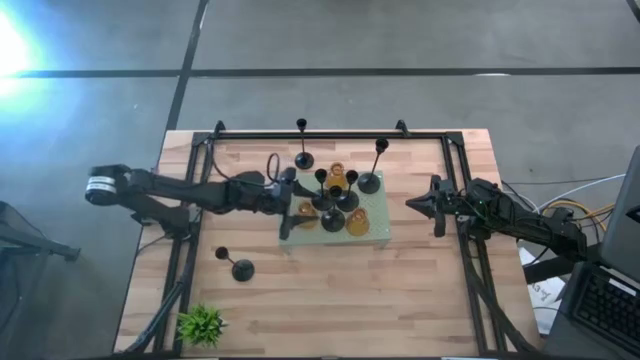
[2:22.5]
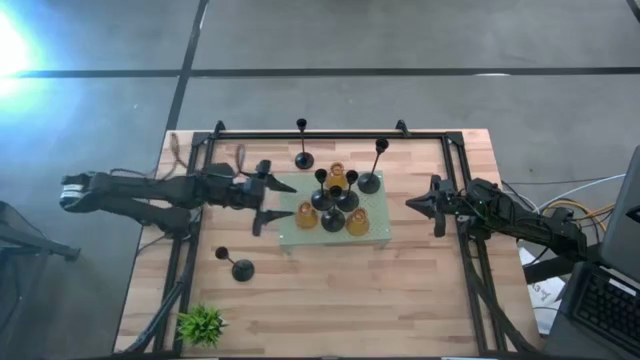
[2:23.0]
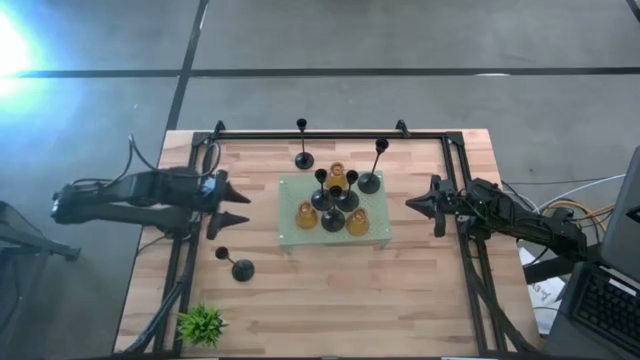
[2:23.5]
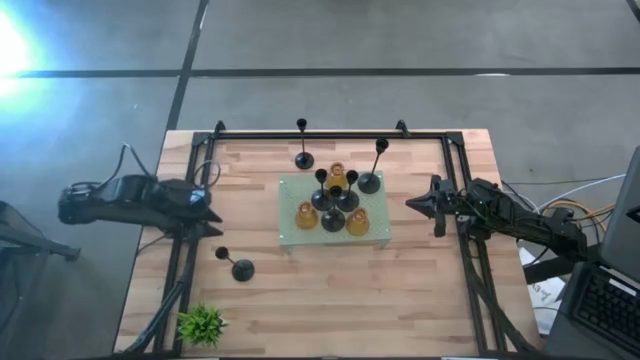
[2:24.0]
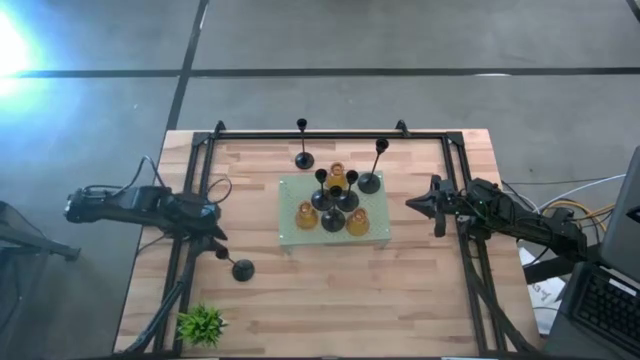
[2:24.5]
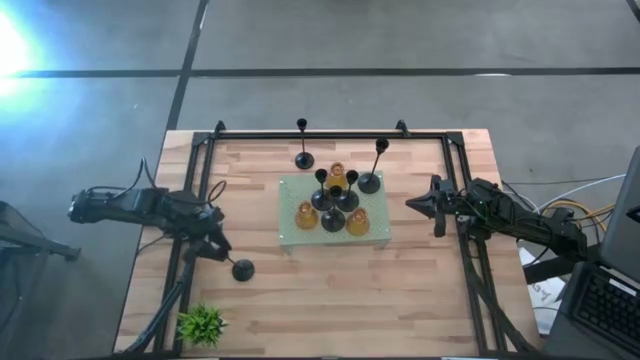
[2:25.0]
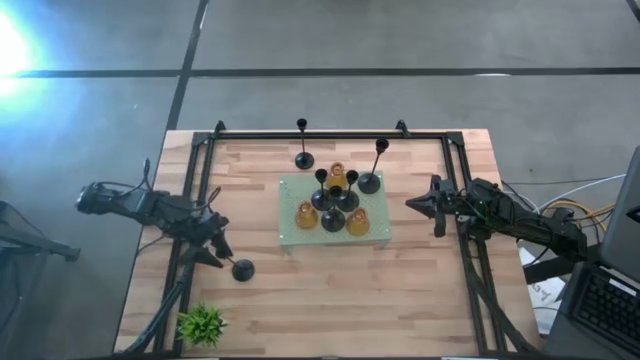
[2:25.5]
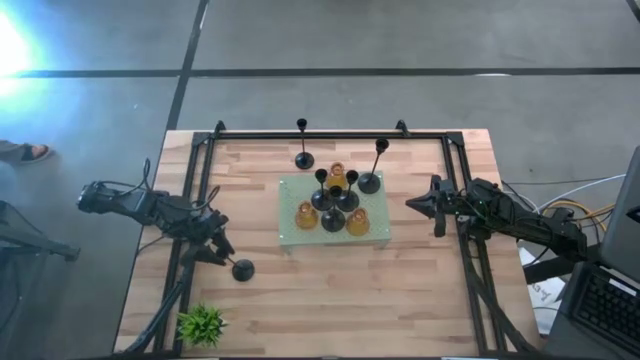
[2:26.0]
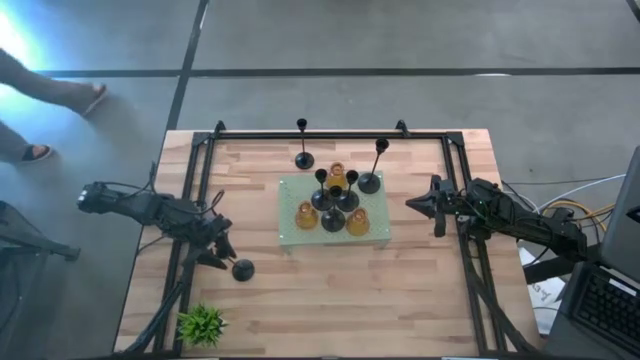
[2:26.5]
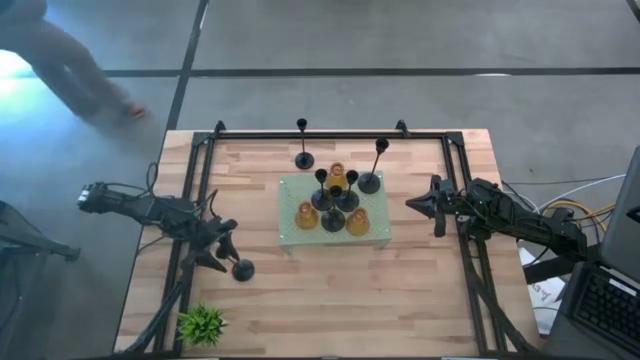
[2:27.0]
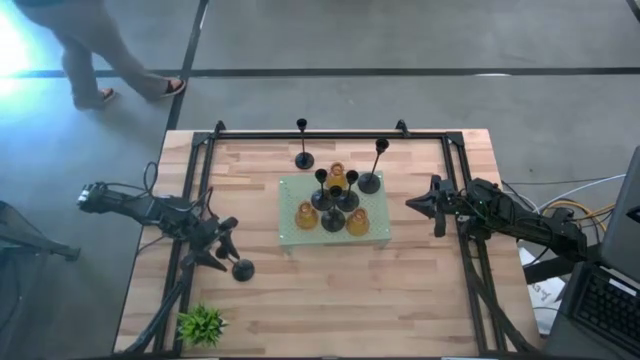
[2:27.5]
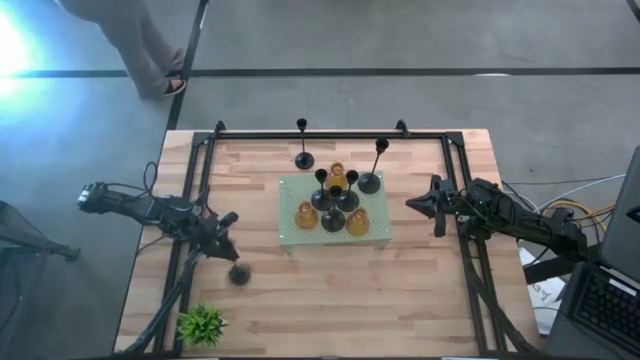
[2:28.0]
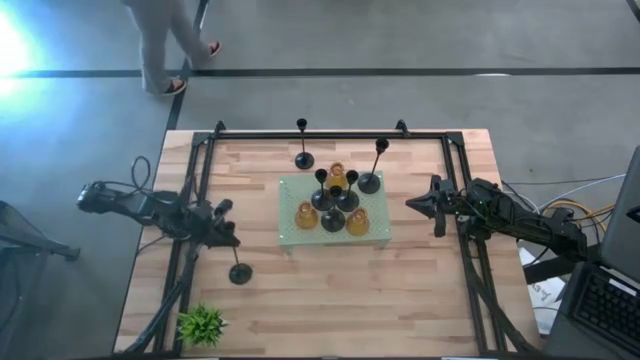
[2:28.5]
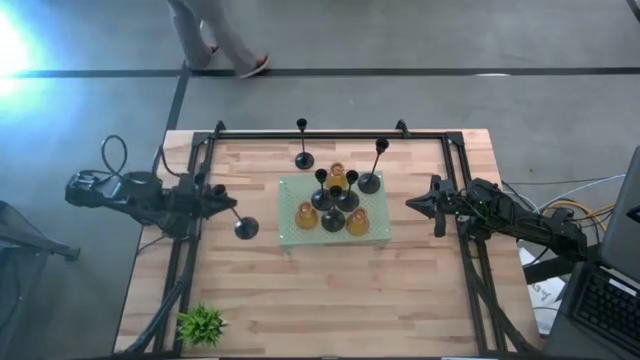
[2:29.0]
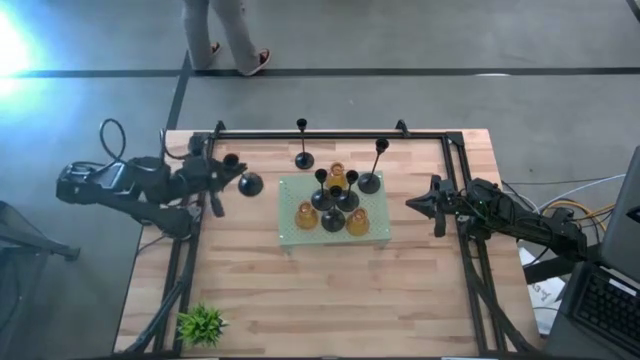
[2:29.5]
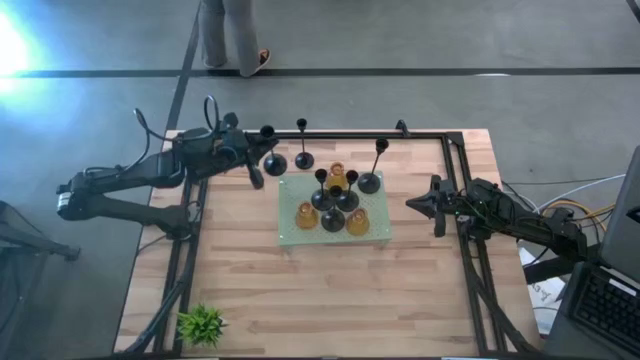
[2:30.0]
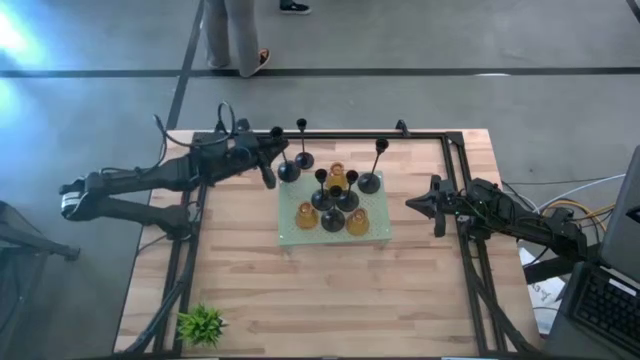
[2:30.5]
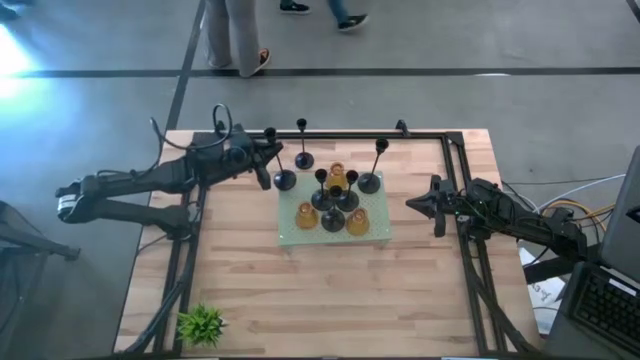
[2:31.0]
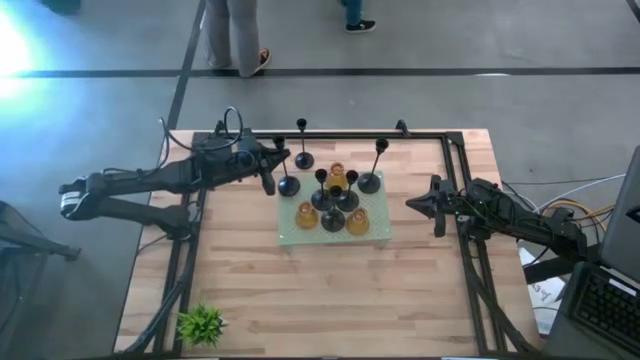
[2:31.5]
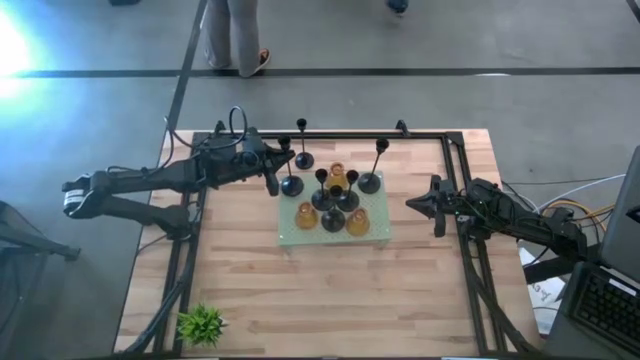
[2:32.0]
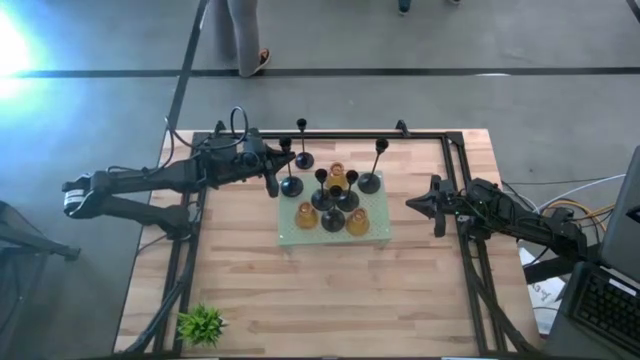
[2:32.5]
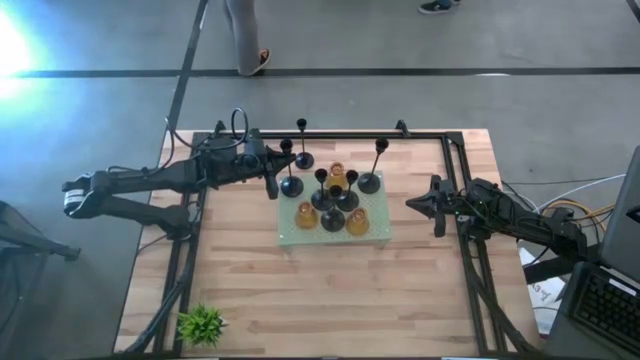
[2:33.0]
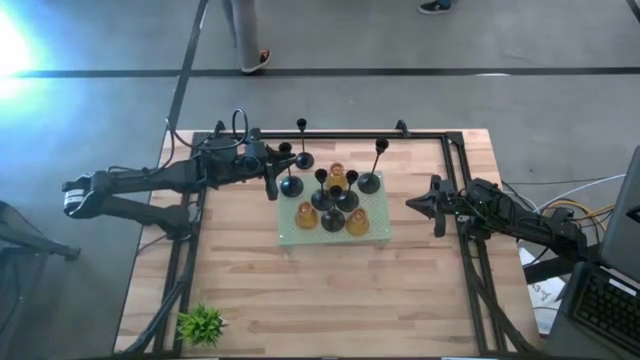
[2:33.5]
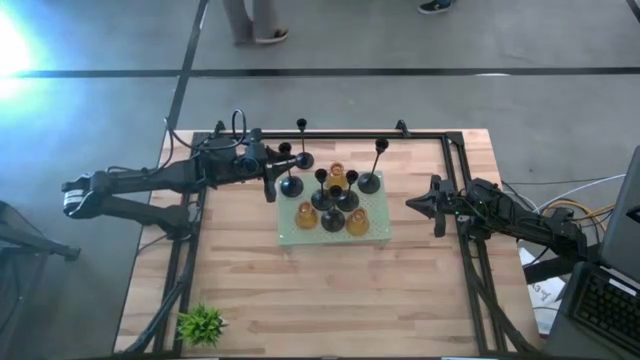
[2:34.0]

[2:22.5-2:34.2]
Task: Pick & Place candle stick holders
Put the black candle holder on the shelf

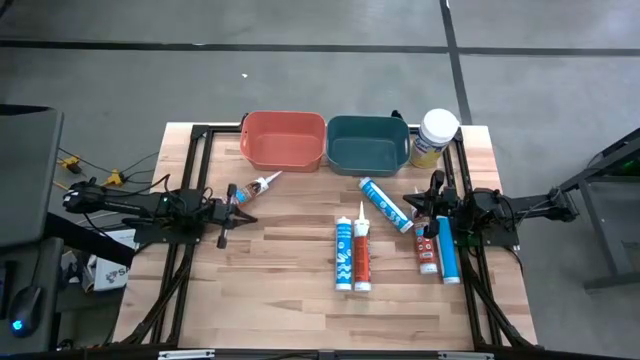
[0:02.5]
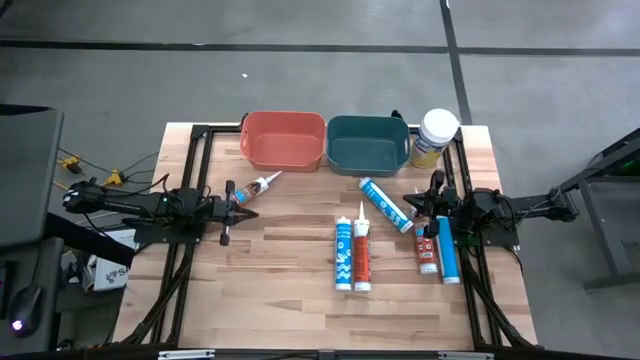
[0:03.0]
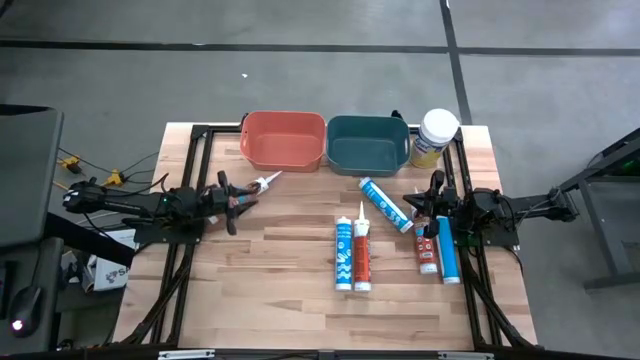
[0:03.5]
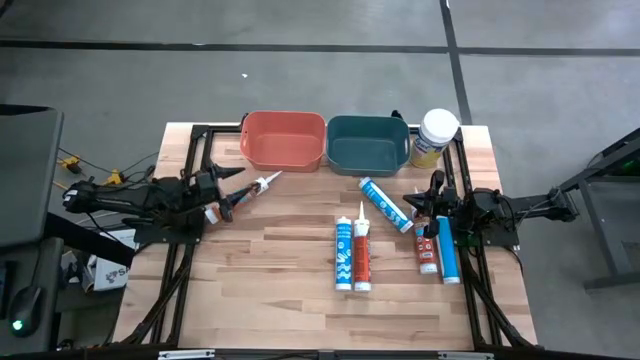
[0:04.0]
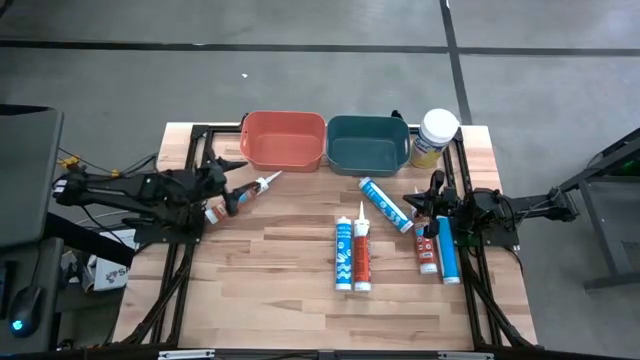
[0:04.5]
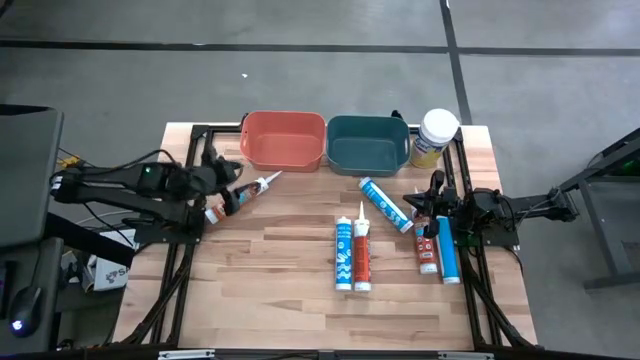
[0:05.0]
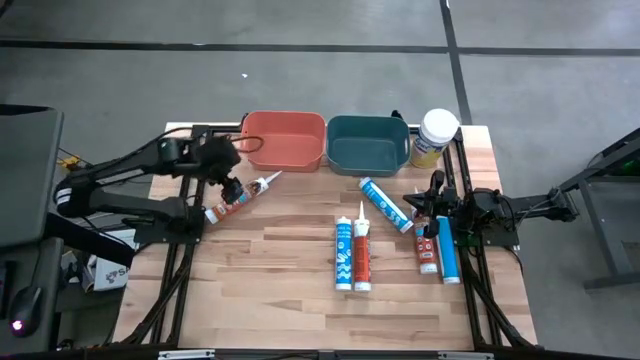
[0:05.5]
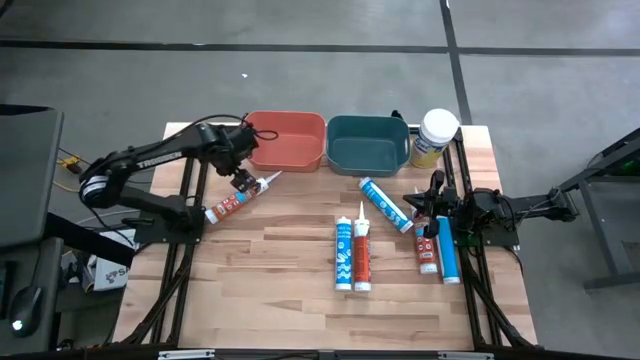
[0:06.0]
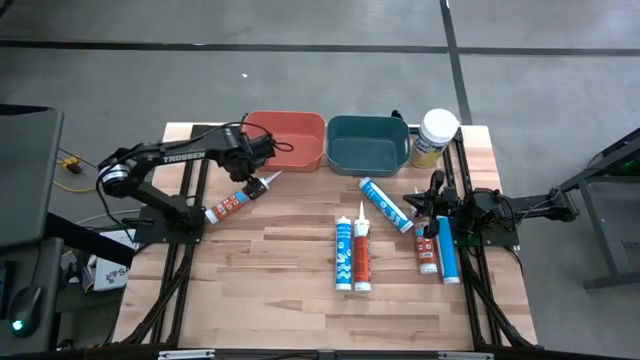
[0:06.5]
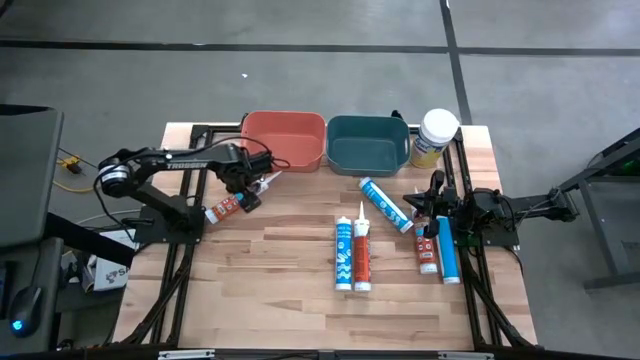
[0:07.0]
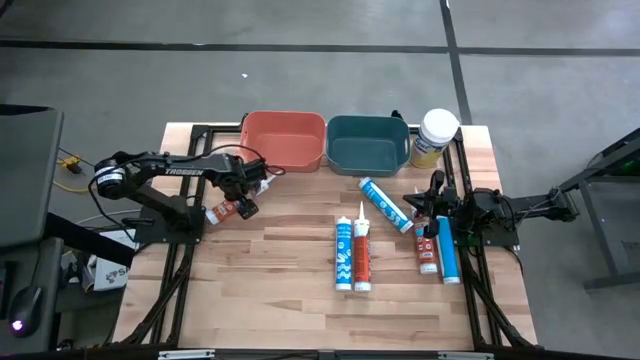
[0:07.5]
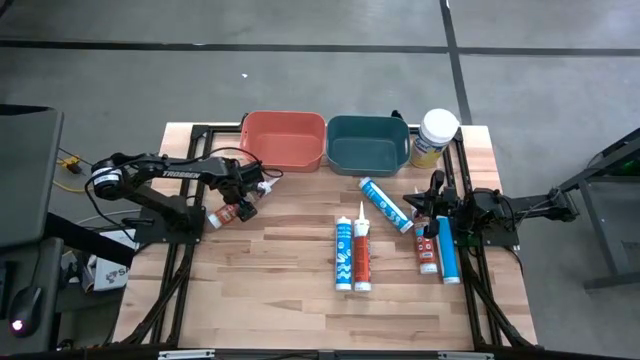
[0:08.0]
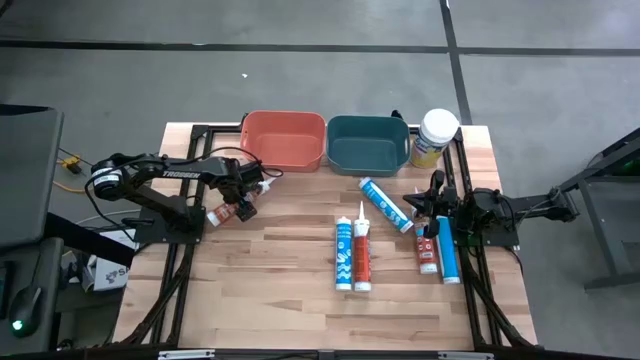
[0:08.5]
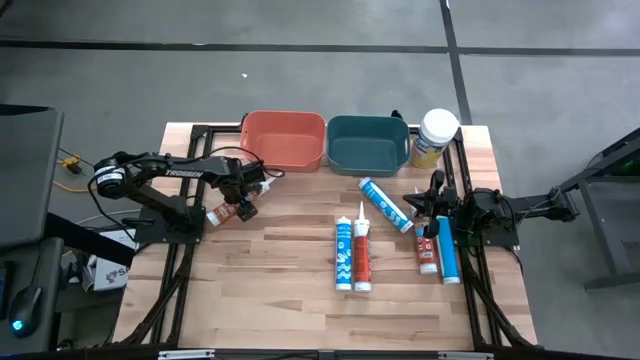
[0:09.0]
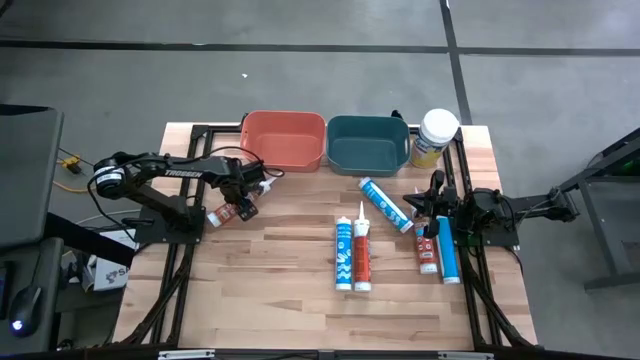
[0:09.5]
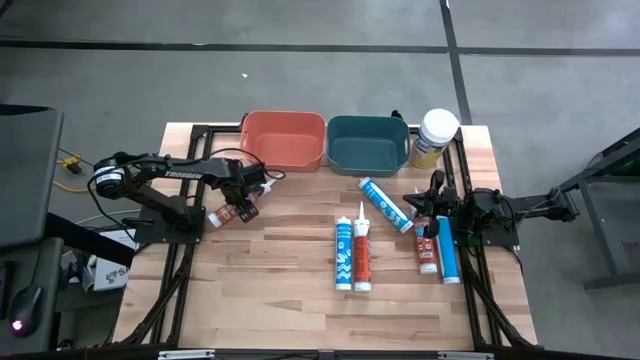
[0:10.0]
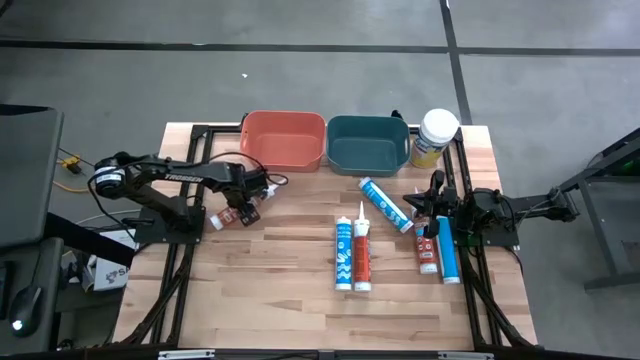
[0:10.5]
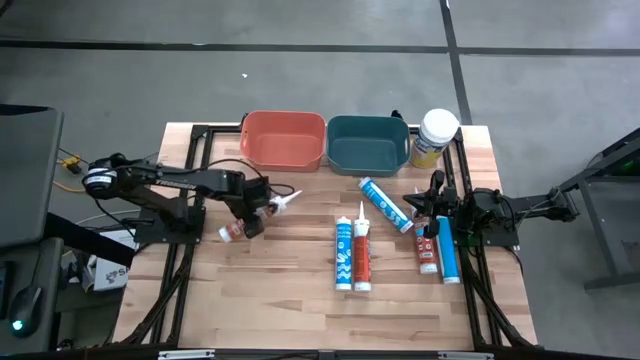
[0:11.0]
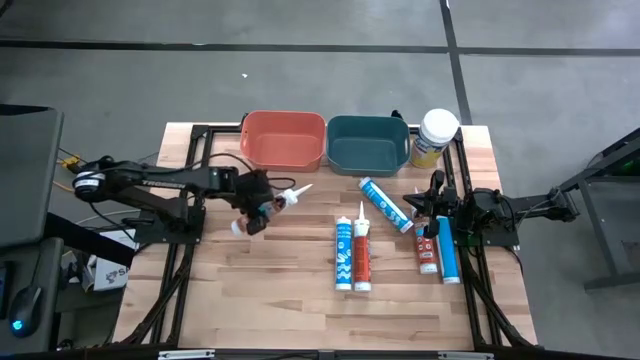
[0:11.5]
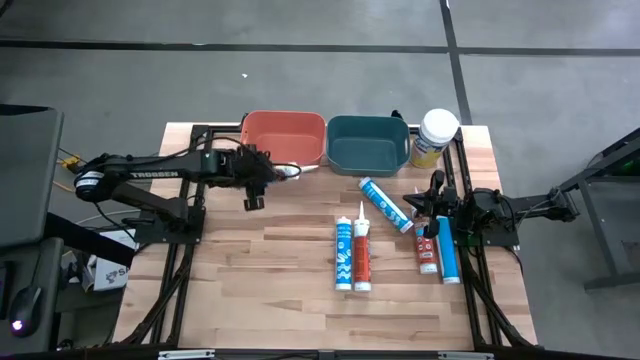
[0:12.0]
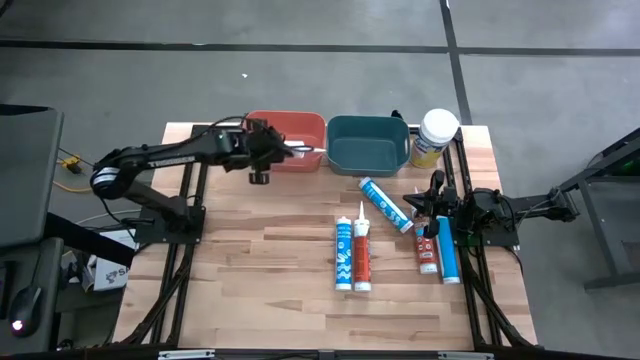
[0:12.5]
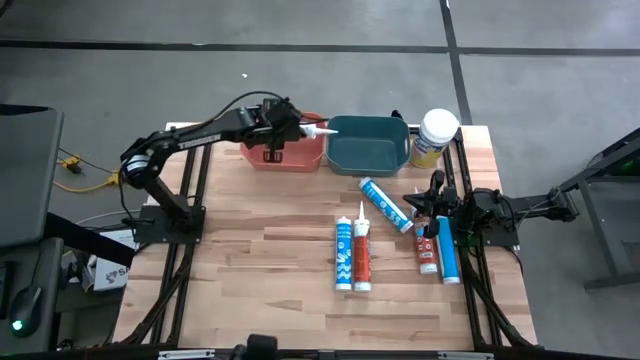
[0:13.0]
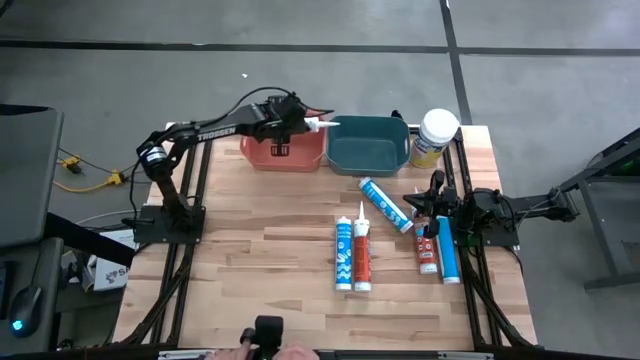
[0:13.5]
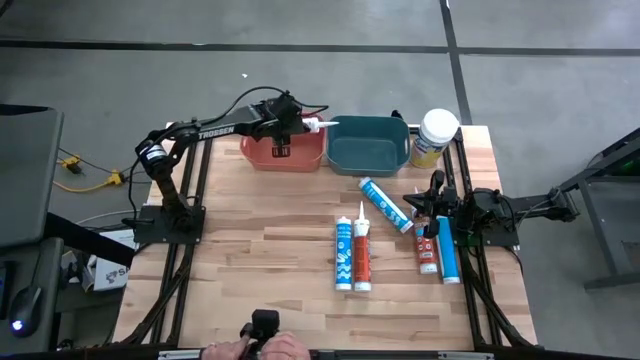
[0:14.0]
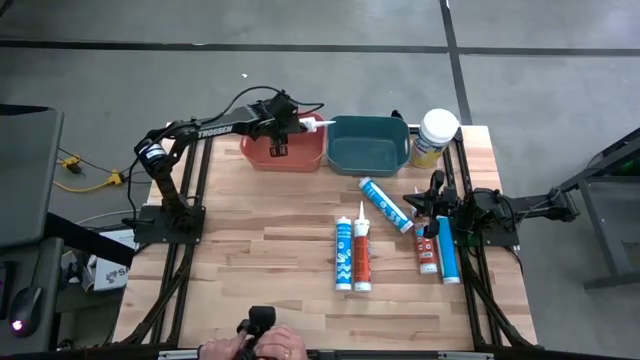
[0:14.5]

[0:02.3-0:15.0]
Task: Pick & place silicon tubes, Sealant and Lysol wipes
Put the left orange sealant into the orange bin
